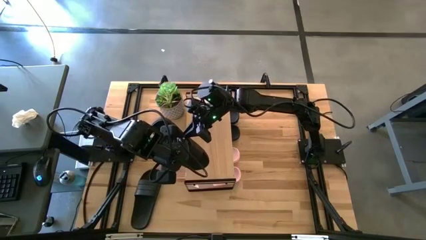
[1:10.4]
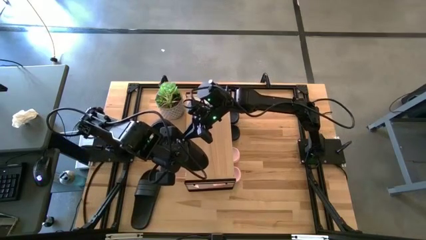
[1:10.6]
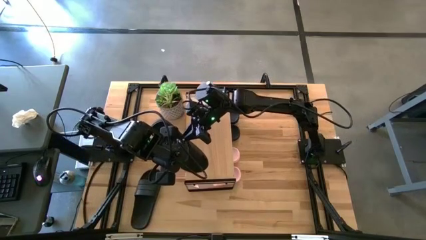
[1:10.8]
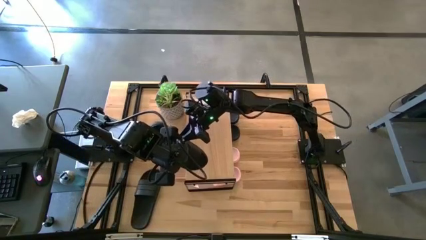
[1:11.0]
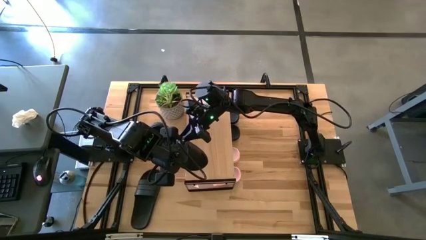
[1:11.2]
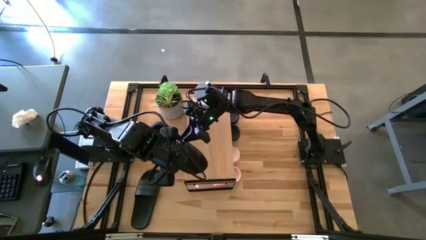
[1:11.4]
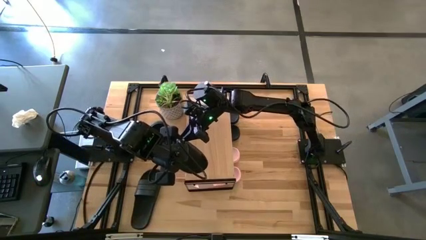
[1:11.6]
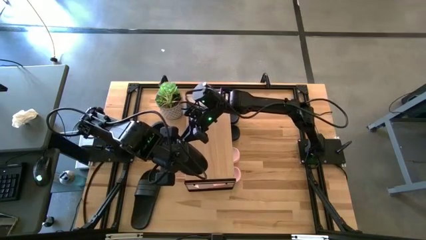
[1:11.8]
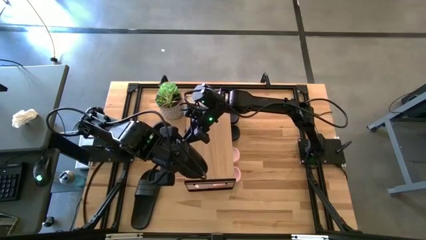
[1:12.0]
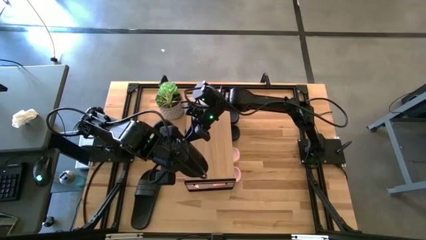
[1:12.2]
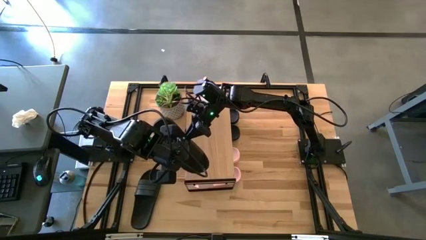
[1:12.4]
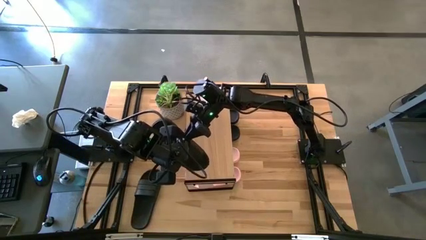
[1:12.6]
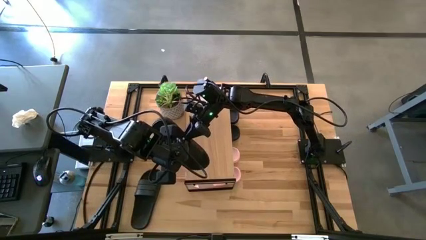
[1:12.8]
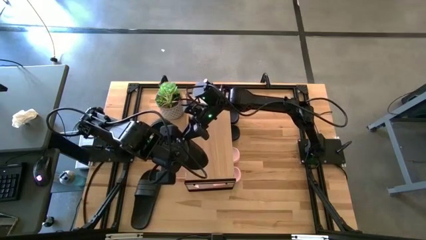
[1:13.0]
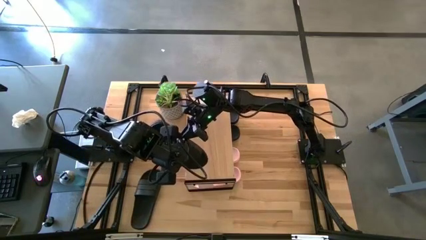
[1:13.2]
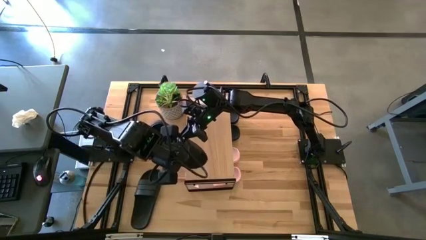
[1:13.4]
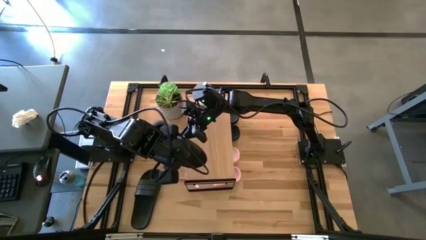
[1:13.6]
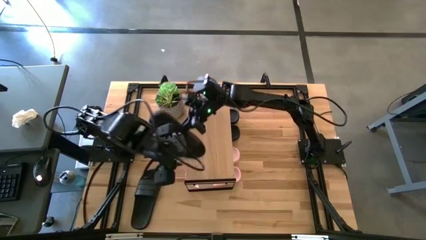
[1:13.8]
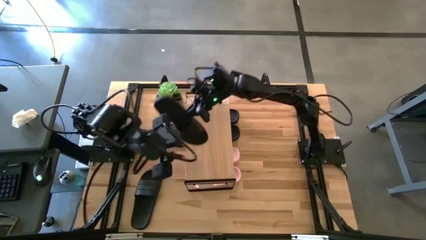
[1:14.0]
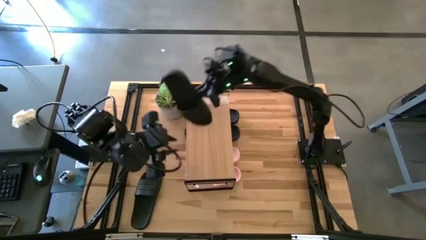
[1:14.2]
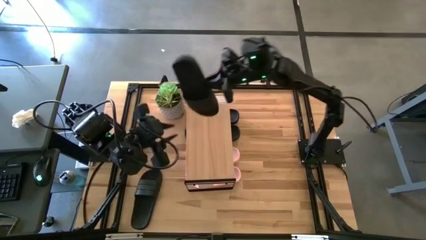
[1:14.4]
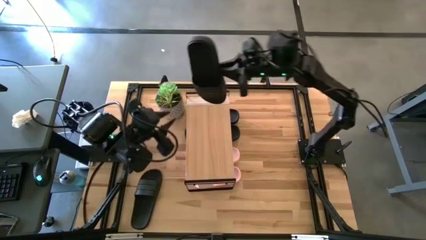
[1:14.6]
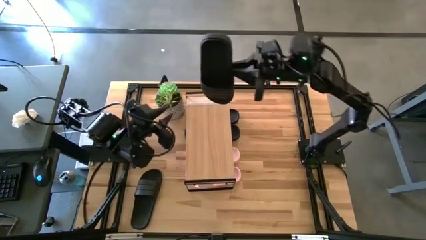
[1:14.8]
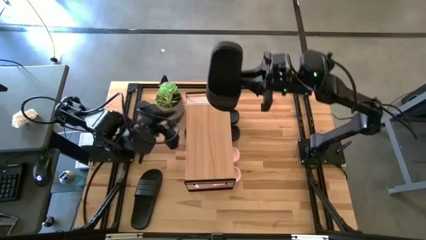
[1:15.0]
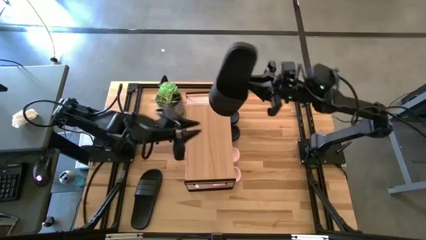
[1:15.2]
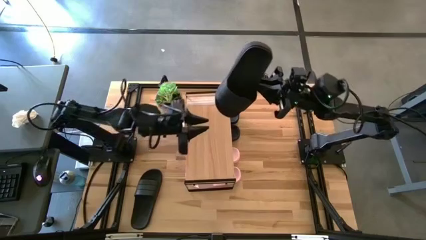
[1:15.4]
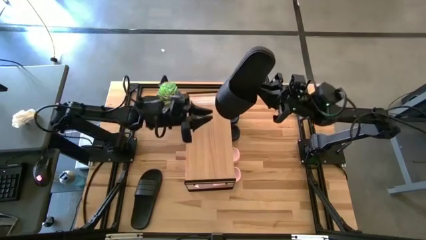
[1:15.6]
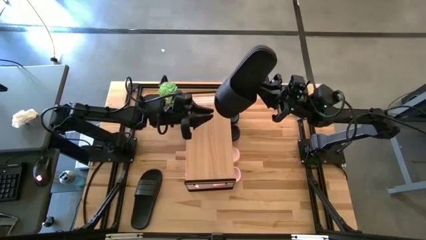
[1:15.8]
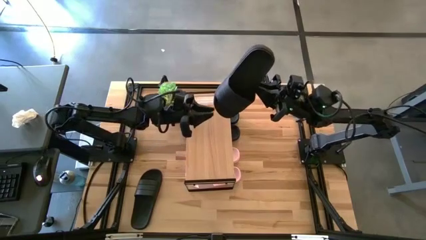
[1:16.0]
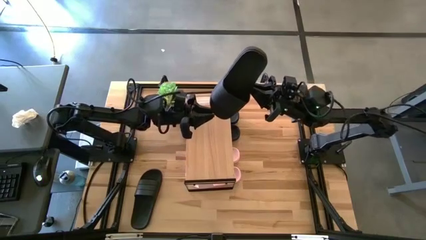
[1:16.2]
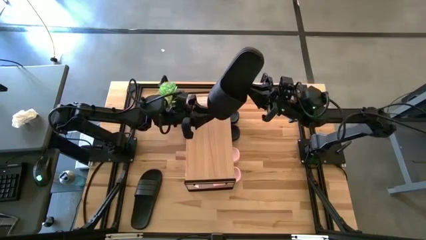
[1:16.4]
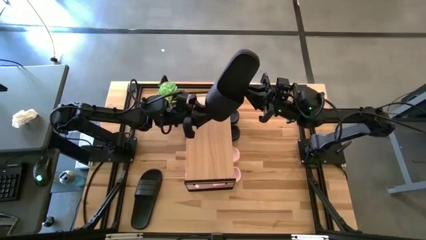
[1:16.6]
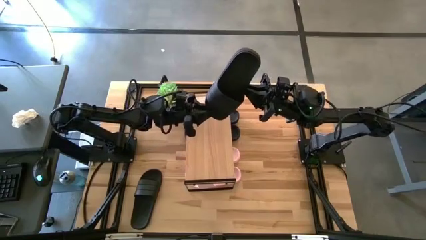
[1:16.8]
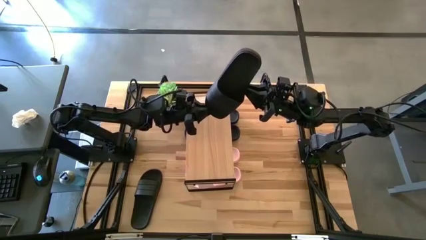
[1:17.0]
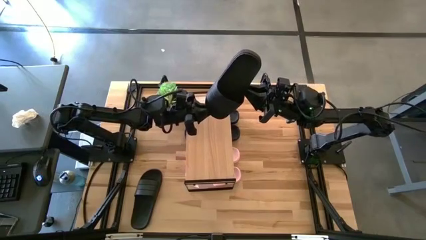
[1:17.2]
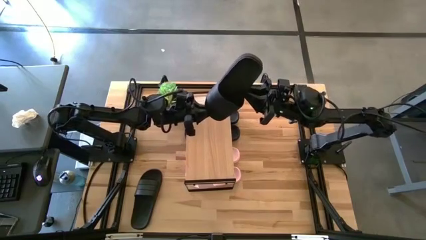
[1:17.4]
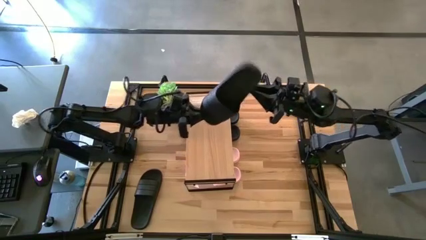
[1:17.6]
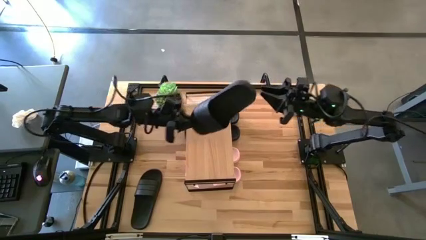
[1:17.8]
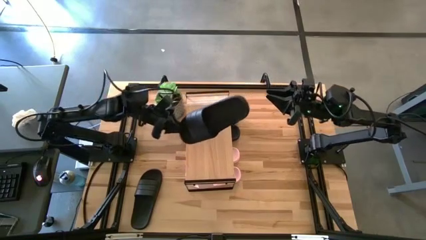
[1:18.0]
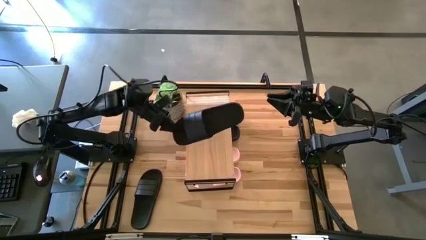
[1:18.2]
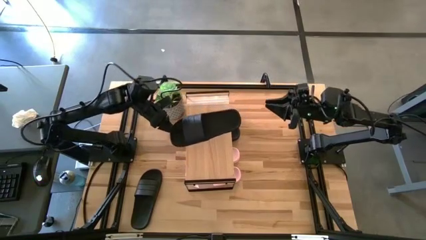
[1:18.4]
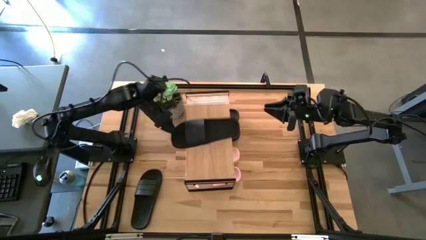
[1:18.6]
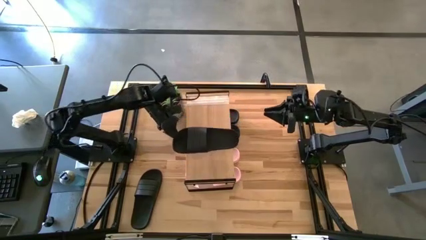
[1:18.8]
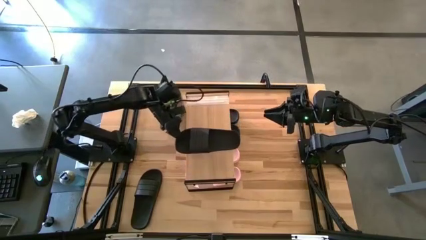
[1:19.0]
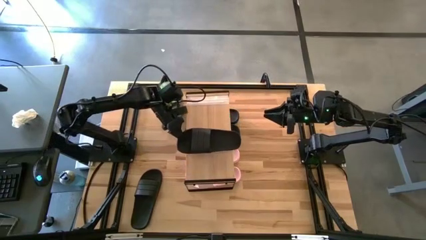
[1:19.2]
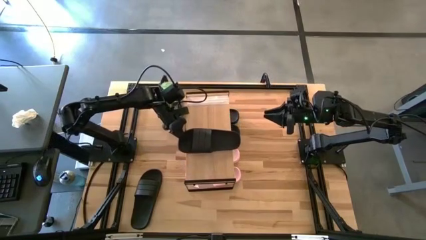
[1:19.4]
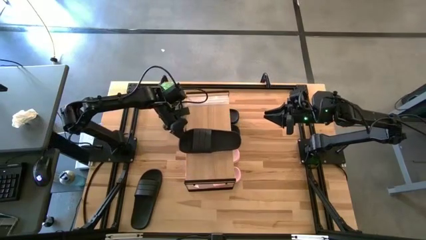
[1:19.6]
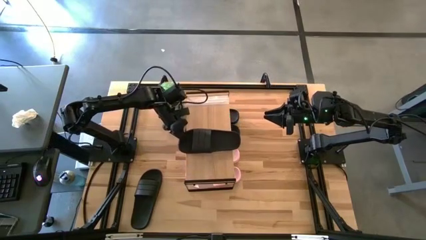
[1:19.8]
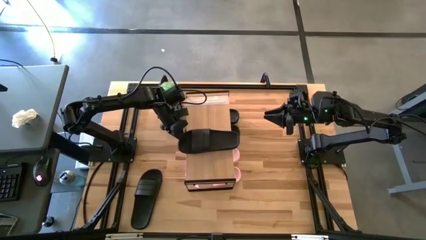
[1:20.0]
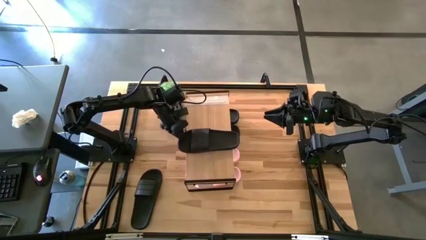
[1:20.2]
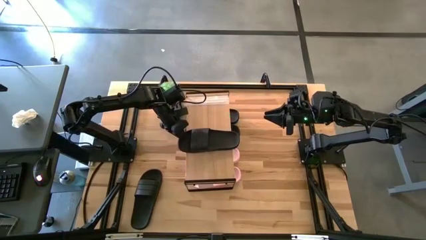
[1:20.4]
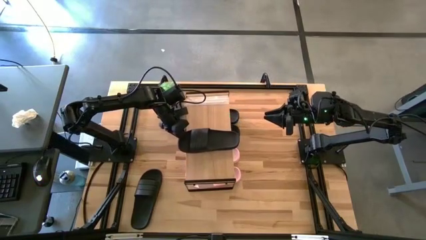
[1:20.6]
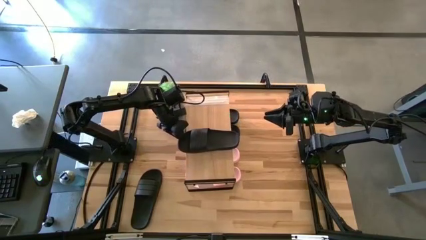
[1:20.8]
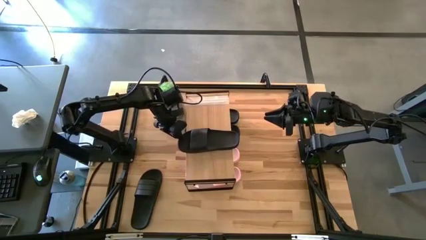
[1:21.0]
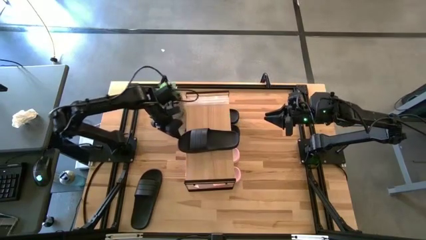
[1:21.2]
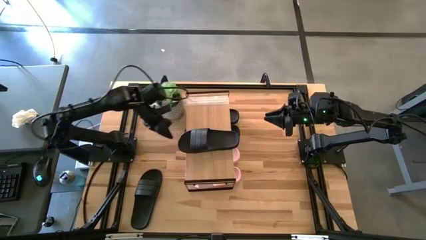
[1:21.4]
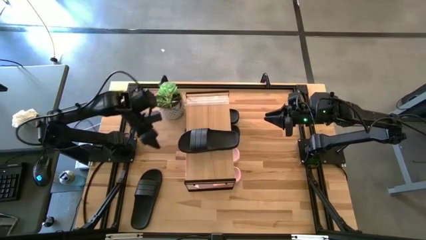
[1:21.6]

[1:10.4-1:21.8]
Task: Pick and place slides into the shelf
Put the right black slide on the shelf
